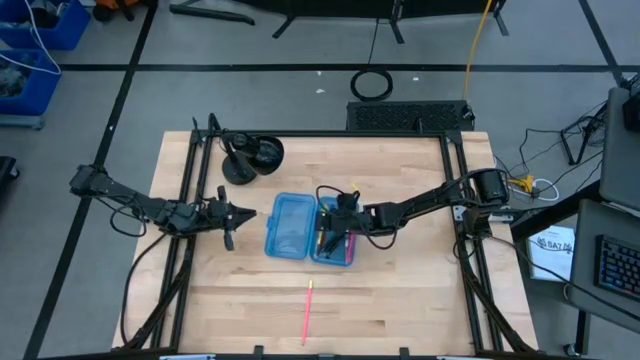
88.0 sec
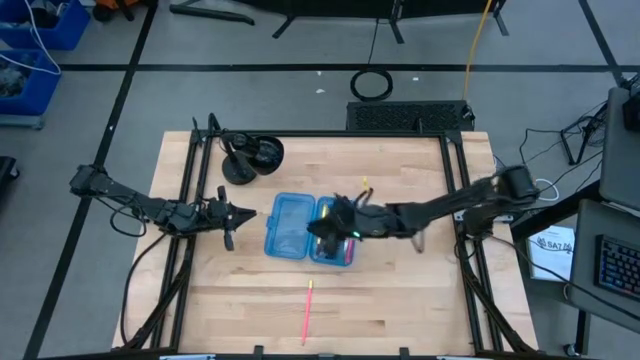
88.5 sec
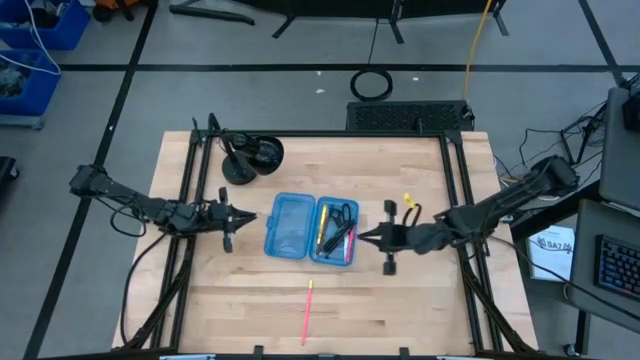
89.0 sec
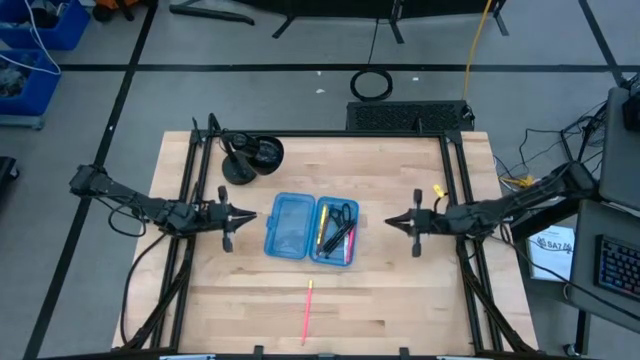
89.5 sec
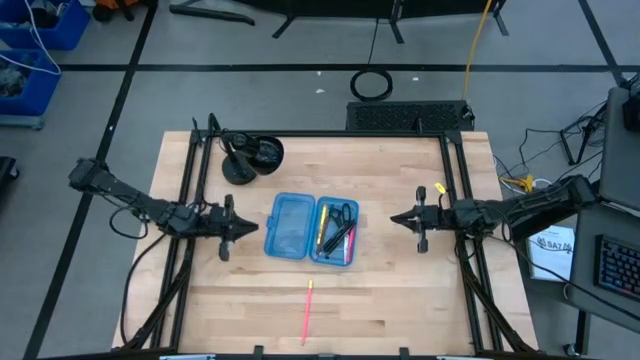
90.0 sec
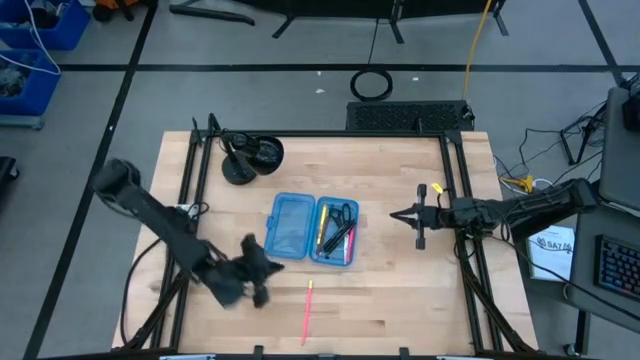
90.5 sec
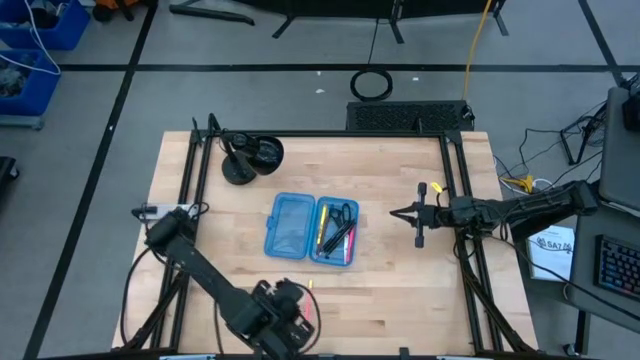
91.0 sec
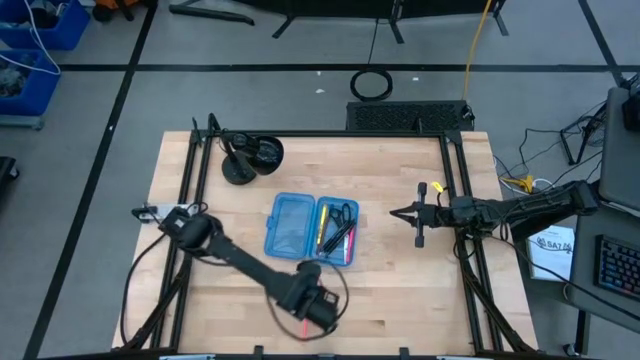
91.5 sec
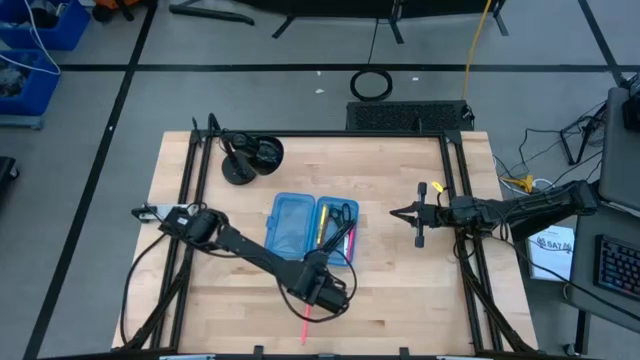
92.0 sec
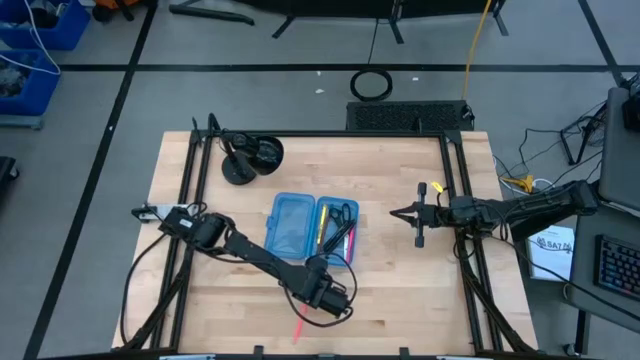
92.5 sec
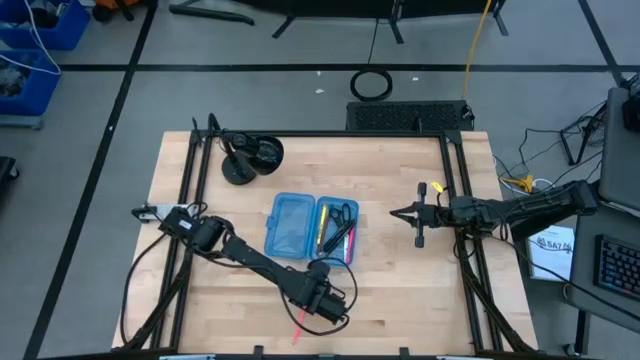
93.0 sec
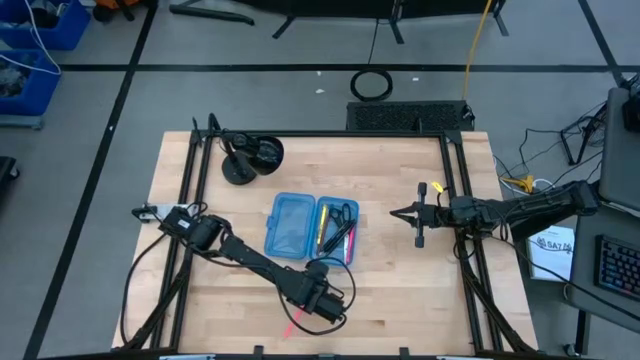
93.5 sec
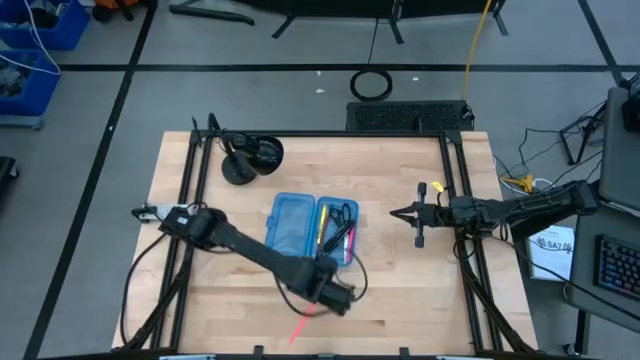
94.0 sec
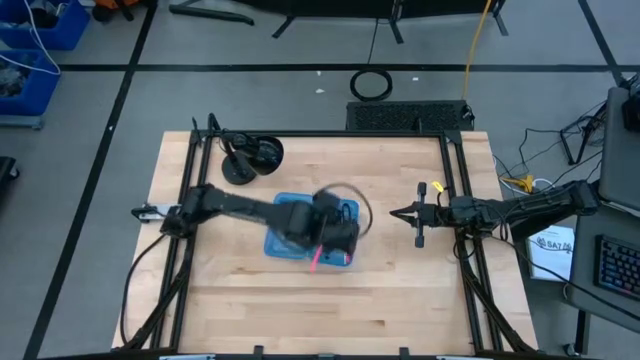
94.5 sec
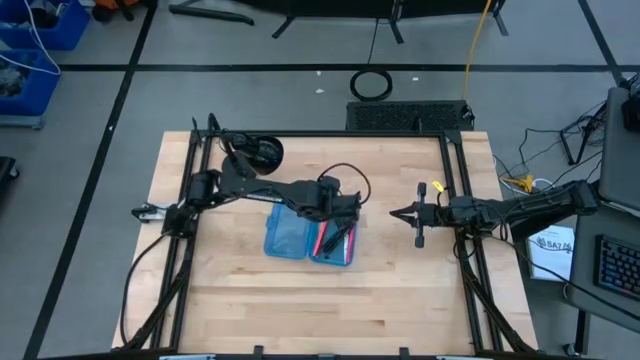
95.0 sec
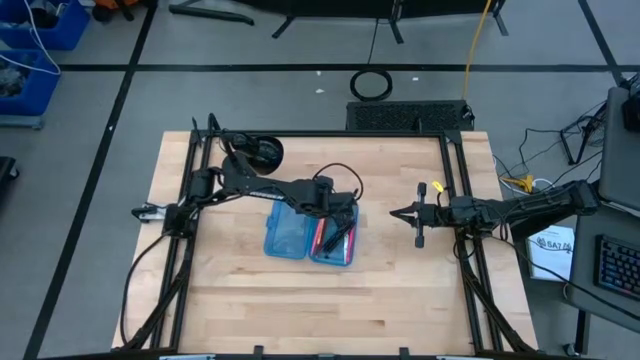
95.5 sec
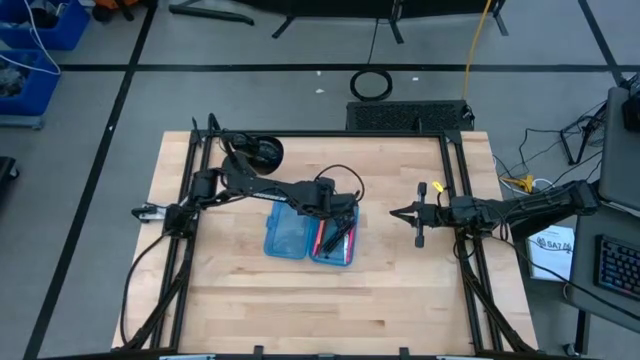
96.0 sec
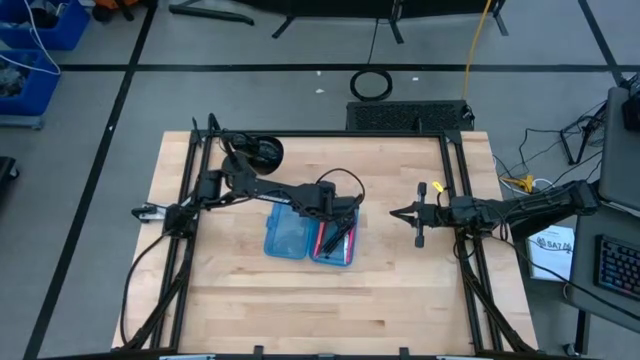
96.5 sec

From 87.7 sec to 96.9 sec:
Task: Pick & place school supplies into a supply box
Put the pink pencil into the blue box

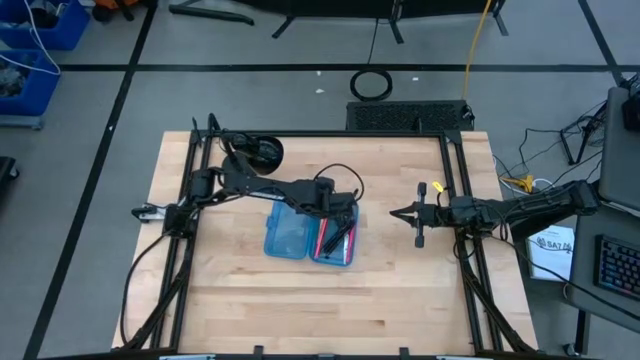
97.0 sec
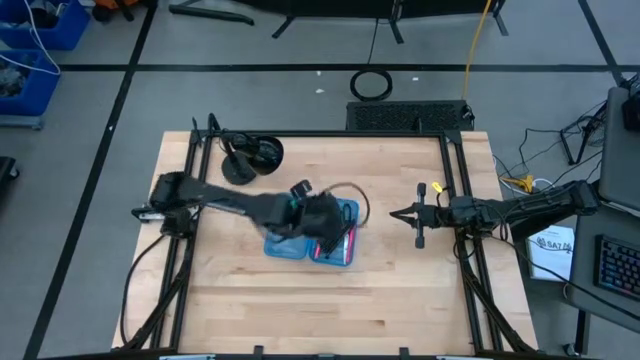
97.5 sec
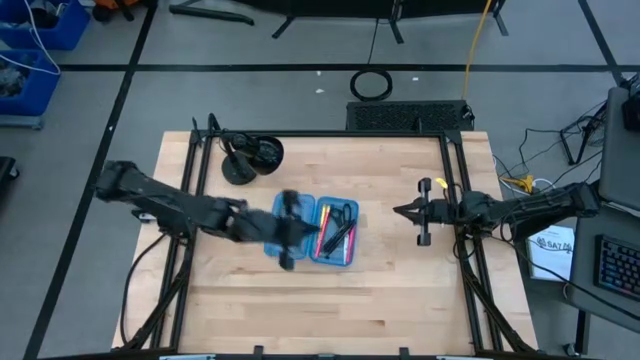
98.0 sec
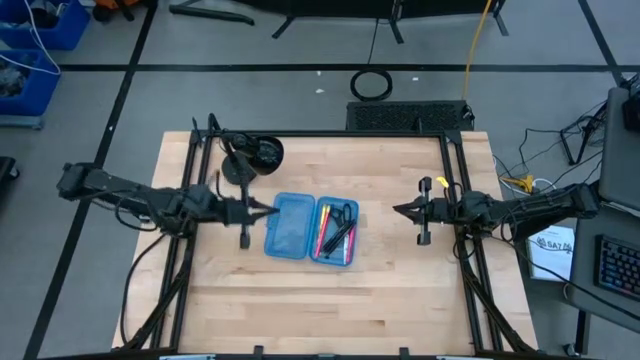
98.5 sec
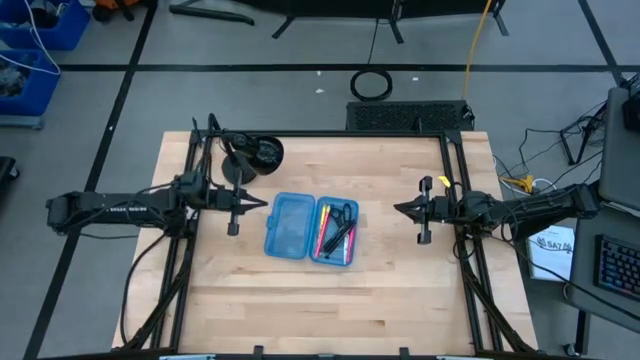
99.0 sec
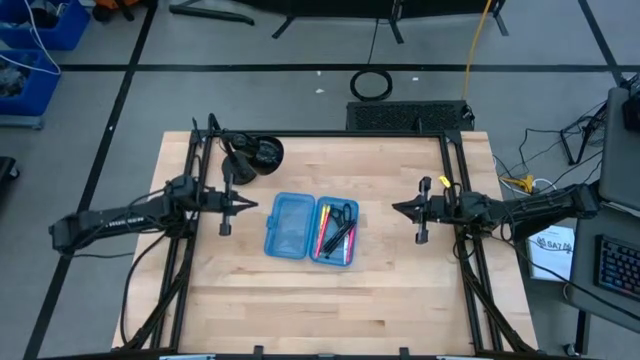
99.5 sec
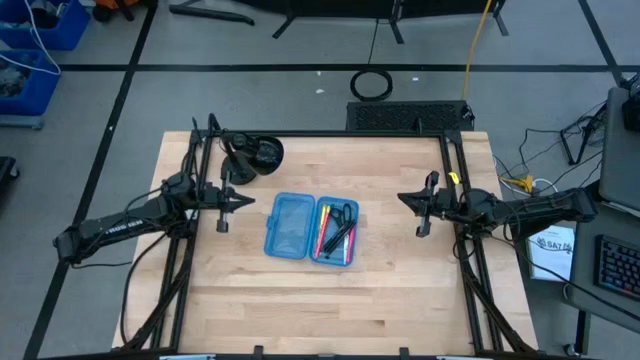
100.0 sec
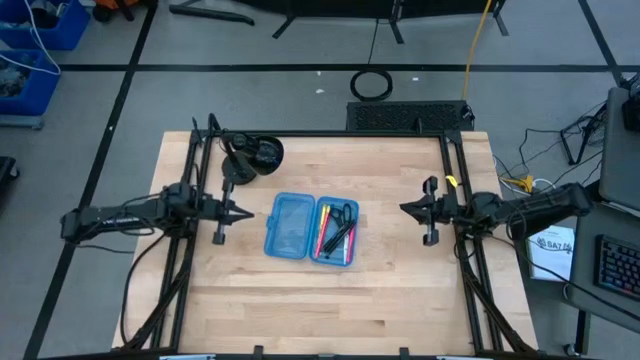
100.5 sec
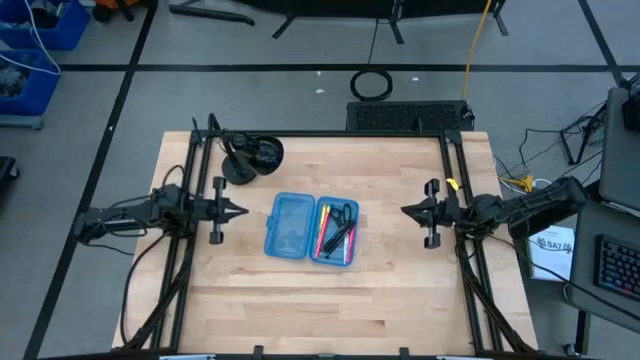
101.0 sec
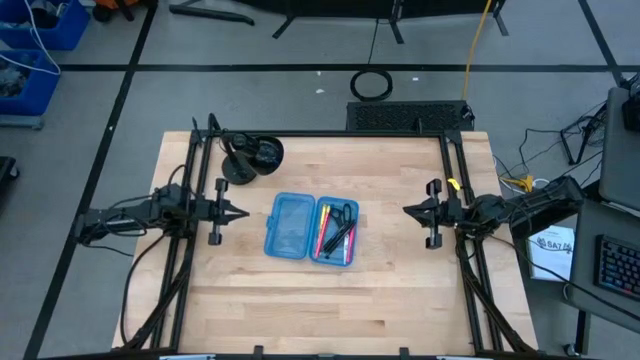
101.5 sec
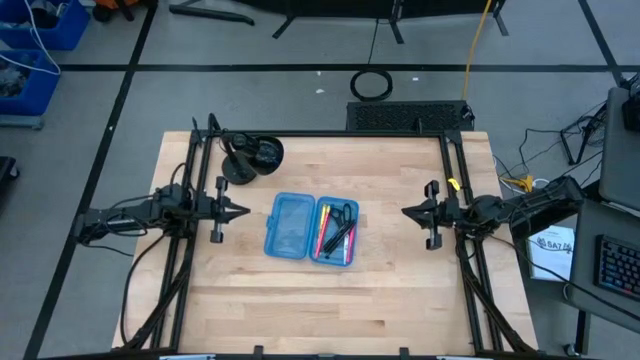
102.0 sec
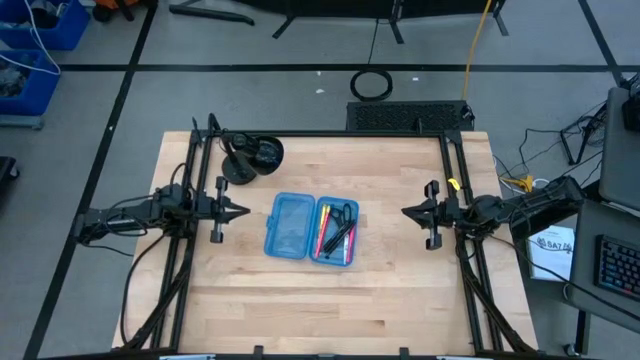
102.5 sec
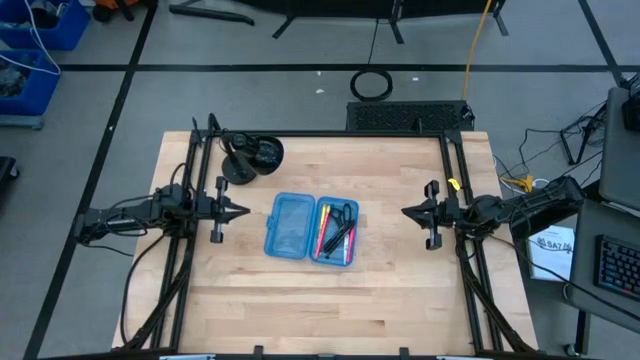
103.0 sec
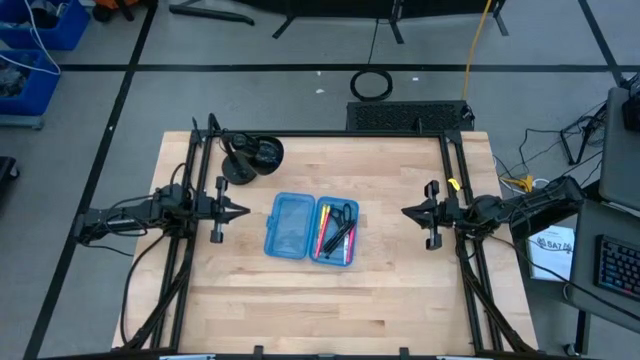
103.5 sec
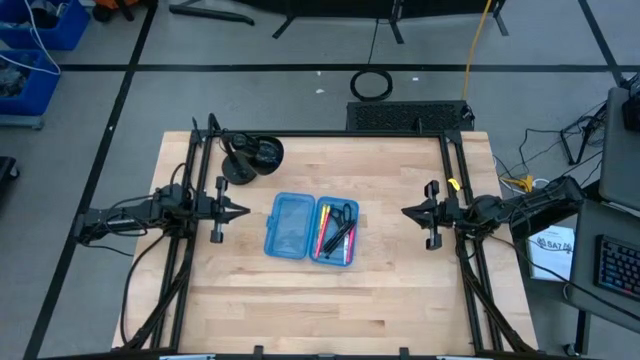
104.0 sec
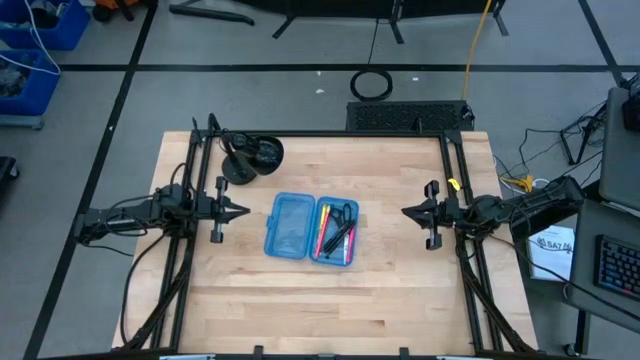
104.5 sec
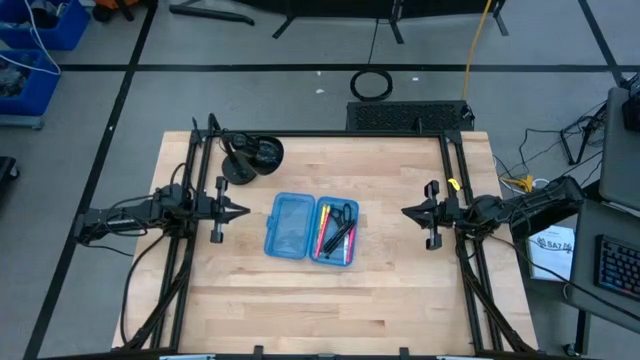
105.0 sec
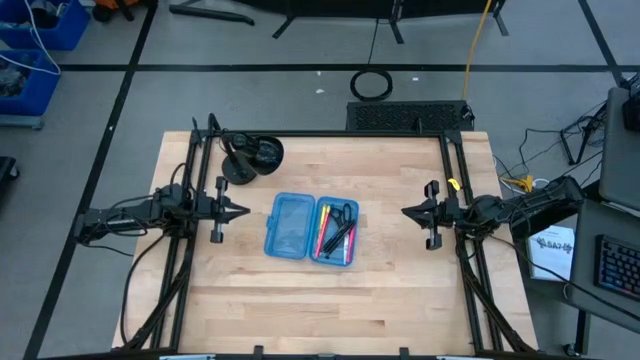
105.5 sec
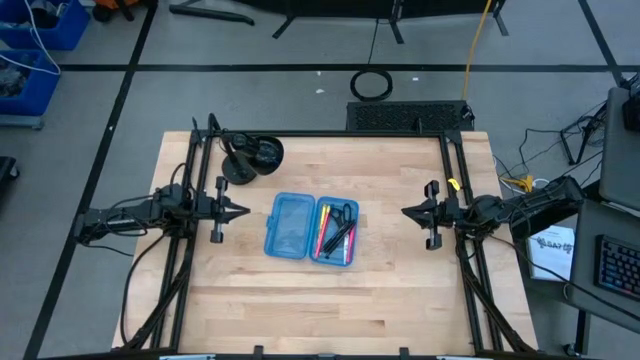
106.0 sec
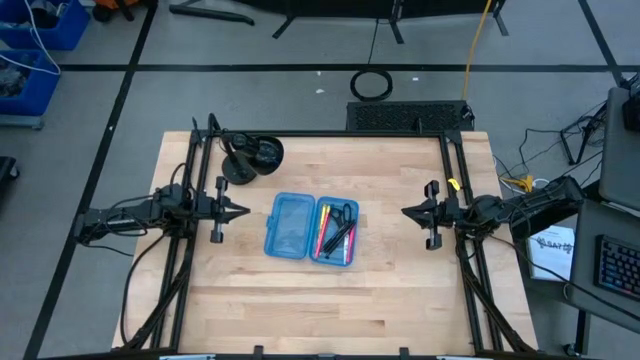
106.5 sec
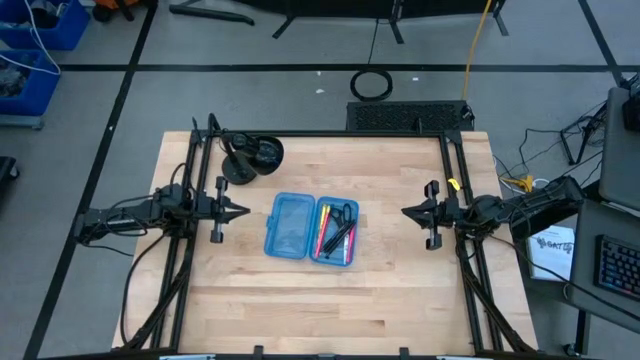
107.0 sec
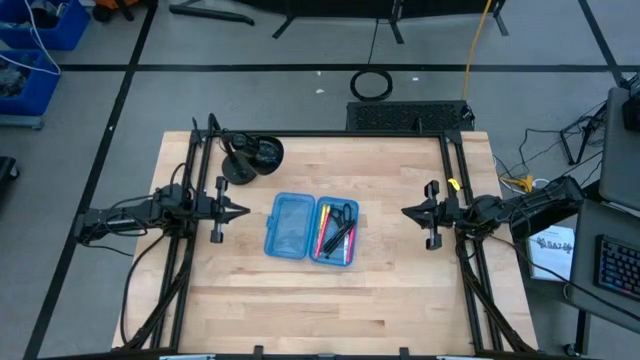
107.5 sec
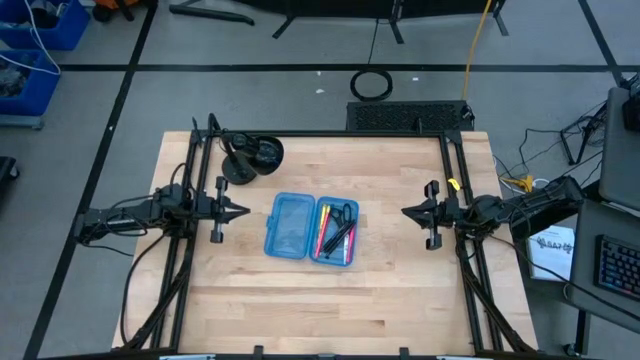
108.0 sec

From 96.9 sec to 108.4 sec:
Return to Home Position

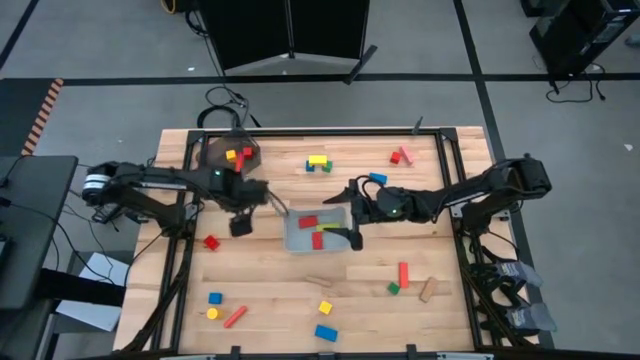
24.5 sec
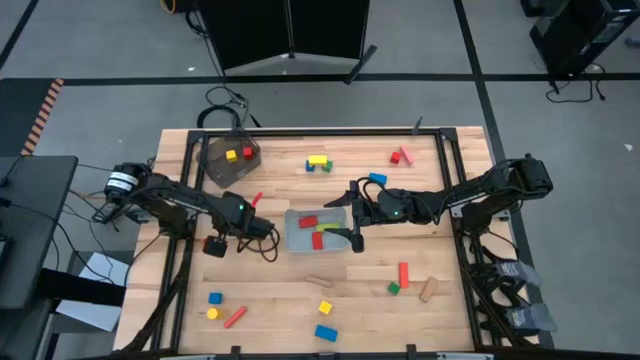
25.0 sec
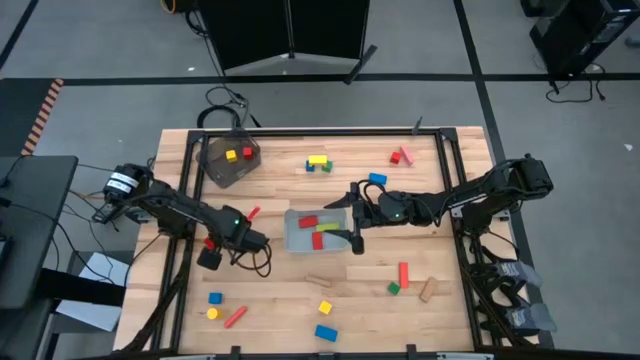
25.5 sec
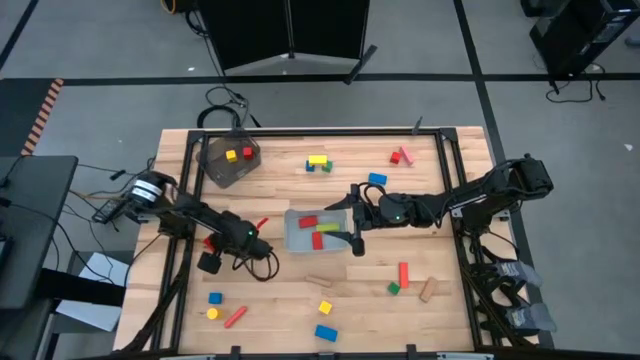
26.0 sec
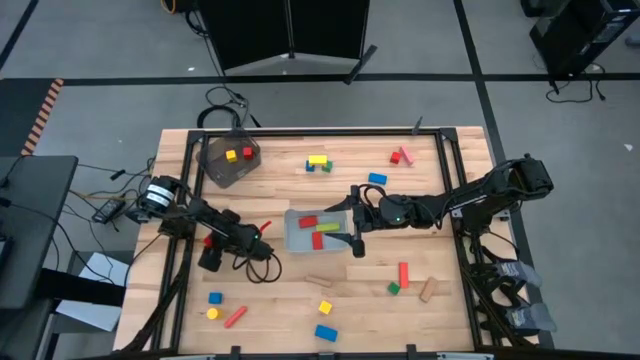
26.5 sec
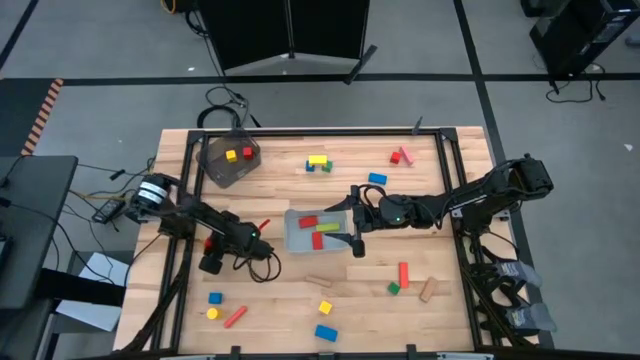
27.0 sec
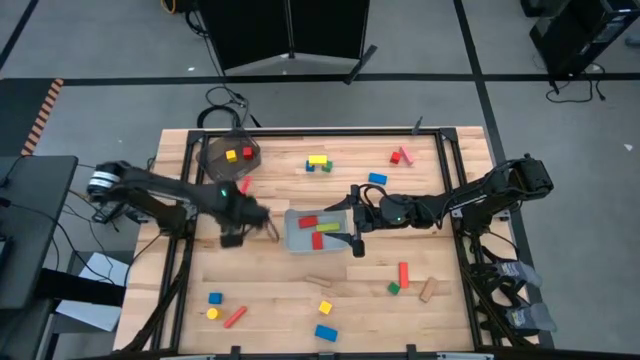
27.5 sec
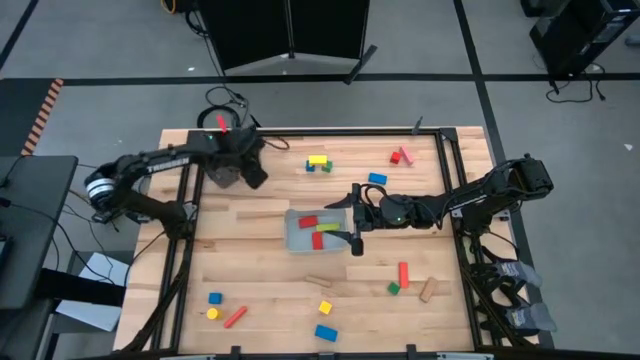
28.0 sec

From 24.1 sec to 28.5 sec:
Task: Sort blocks by size
Put the 4-stud red game piece into the black bin
